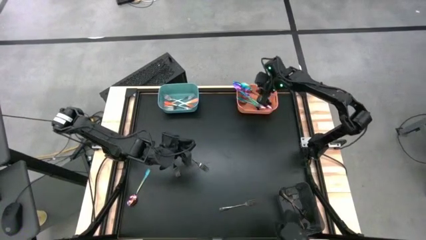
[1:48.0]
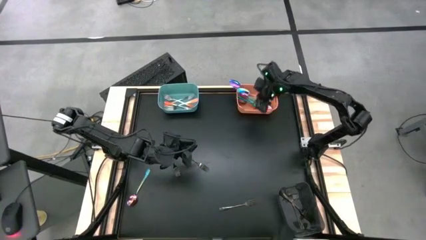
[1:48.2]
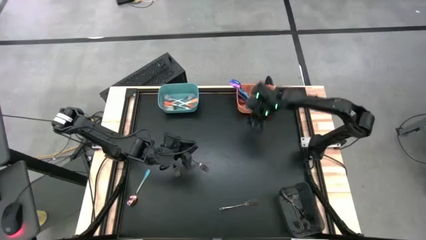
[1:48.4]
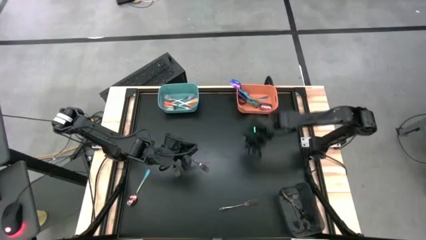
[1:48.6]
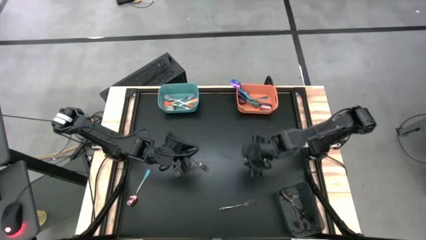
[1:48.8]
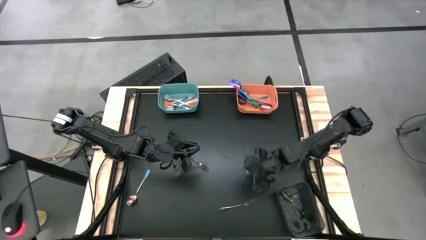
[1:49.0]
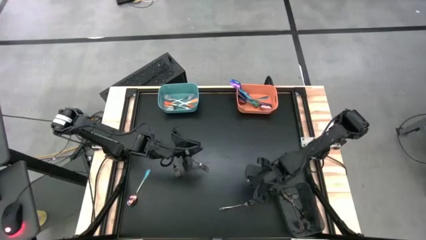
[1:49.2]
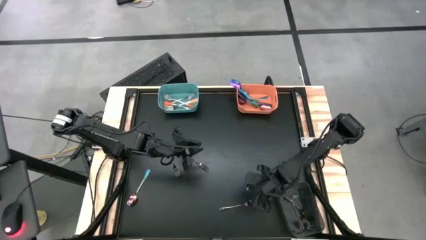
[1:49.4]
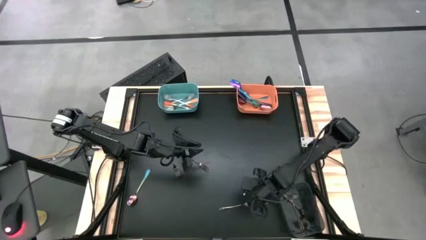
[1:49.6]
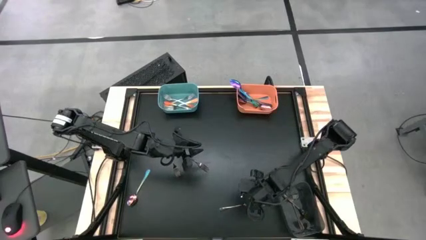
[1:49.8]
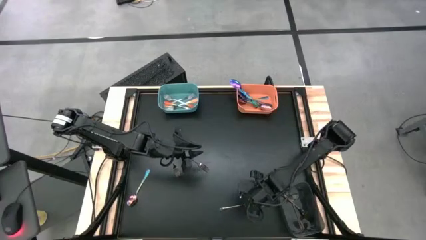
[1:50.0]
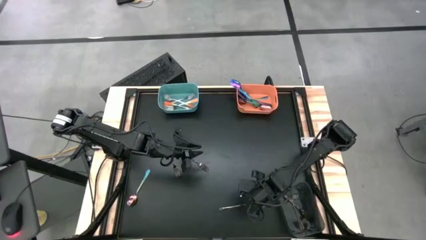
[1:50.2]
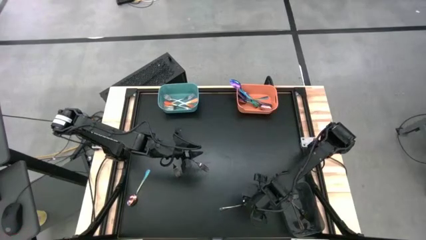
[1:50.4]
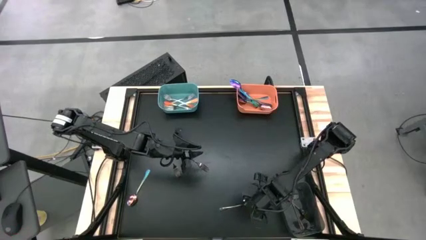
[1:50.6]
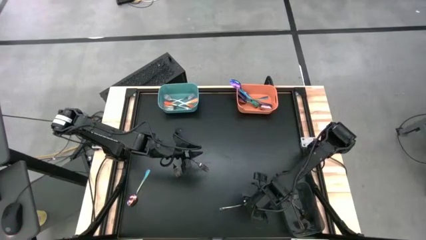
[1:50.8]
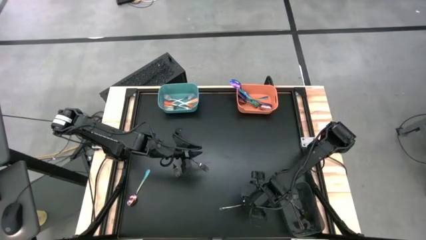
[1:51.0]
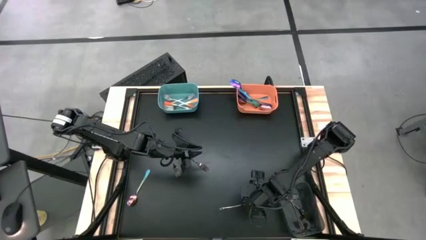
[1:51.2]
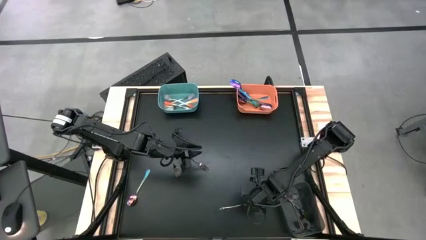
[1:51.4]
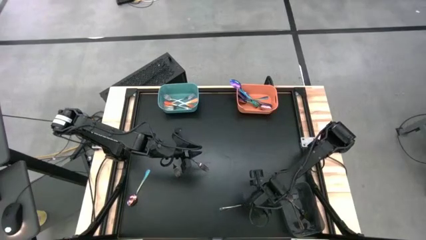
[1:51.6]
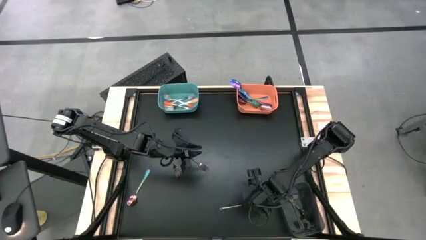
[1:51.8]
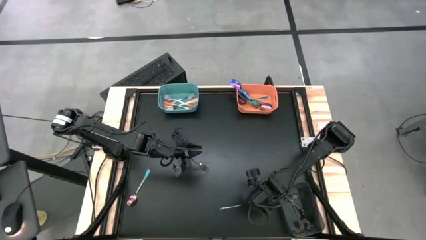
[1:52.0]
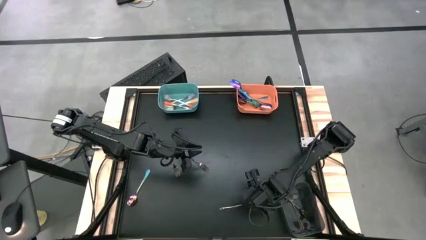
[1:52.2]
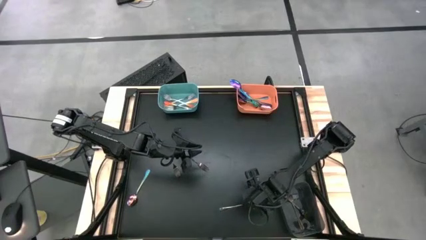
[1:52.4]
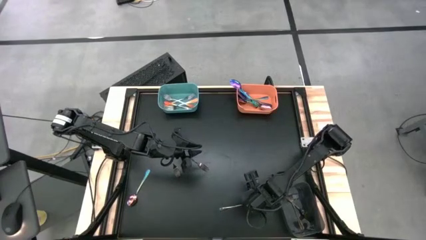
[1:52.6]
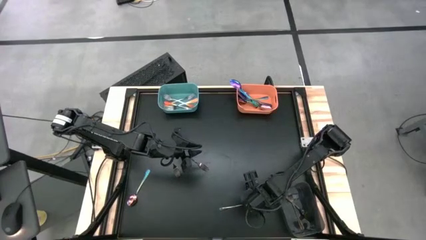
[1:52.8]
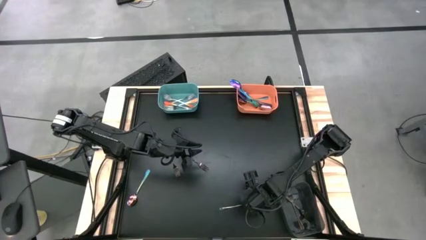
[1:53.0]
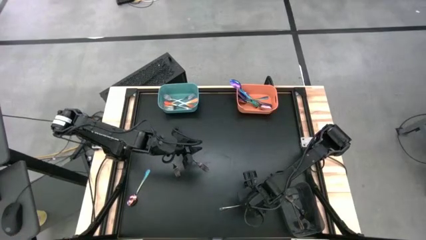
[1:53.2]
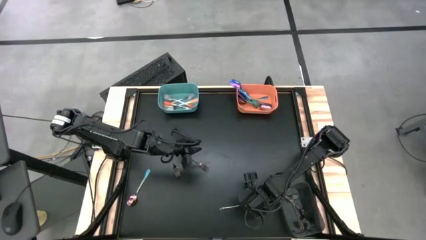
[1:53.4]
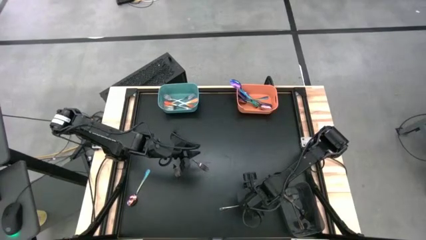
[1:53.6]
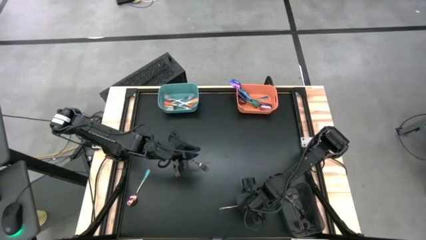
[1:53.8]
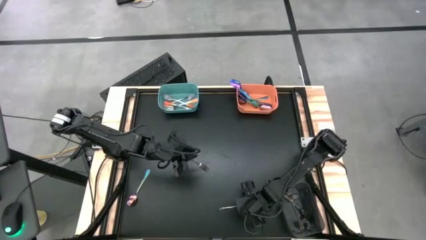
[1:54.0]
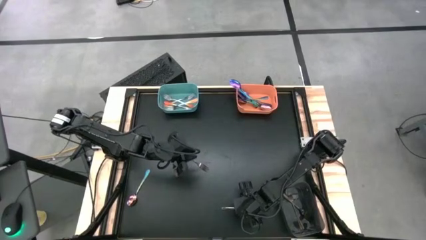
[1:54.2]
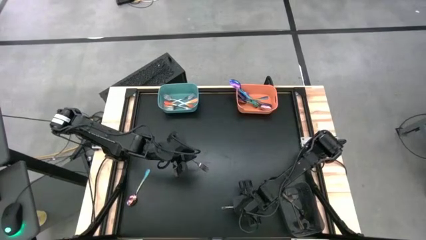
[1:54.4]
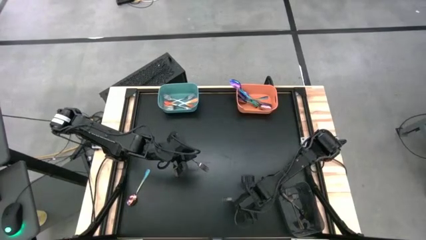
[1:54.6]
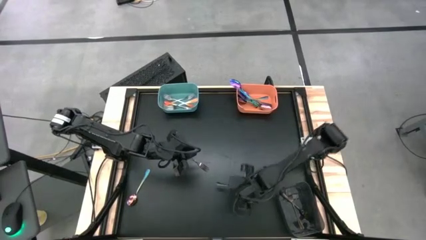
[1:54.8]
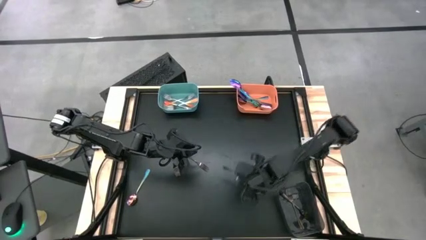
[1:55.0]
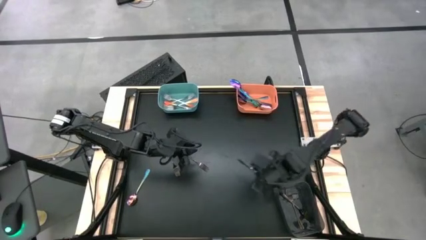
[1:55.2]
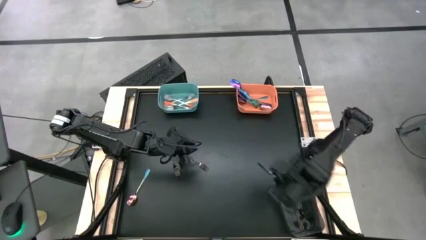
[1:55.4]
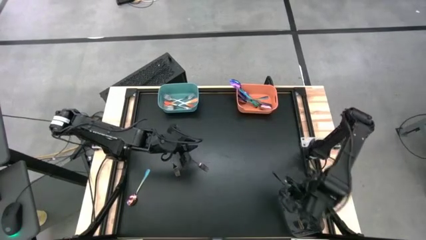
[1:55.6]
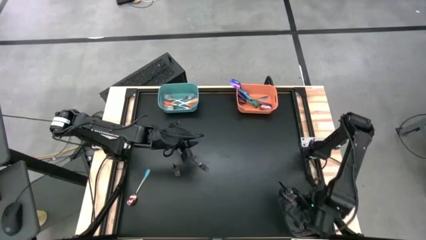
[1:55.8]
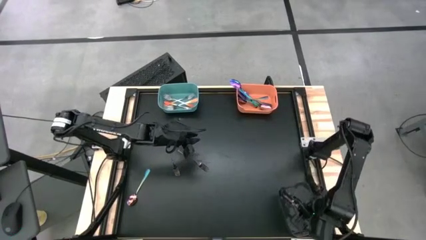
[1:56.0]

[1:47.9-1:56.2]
Task: Sort silverware by color (type)
Put the black fork into the black bin

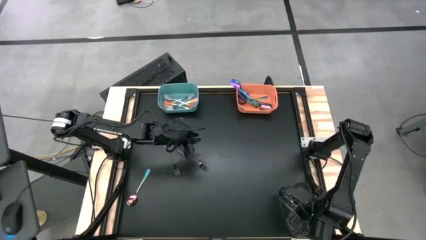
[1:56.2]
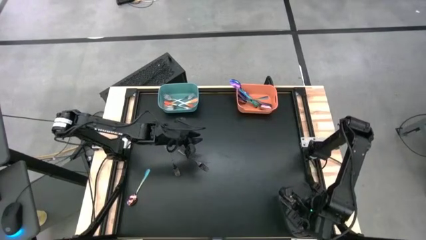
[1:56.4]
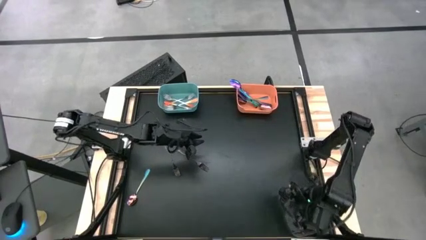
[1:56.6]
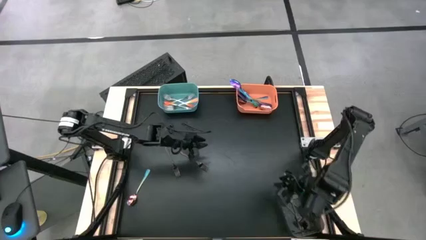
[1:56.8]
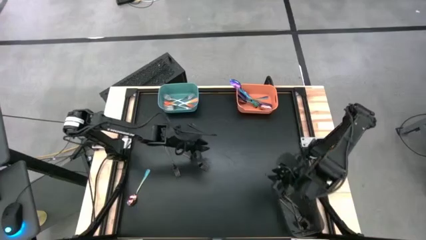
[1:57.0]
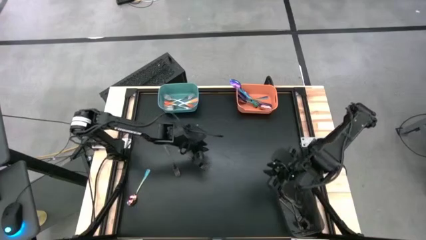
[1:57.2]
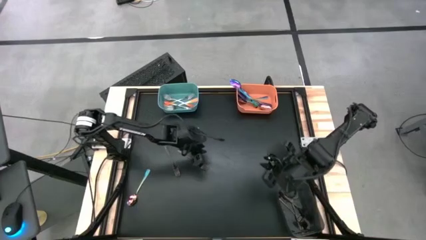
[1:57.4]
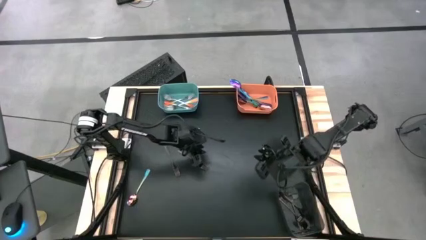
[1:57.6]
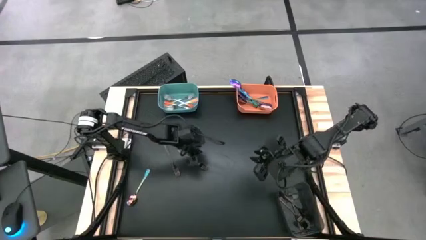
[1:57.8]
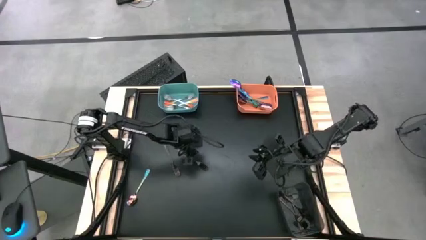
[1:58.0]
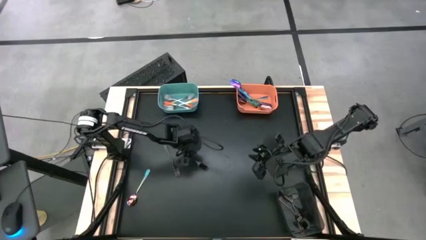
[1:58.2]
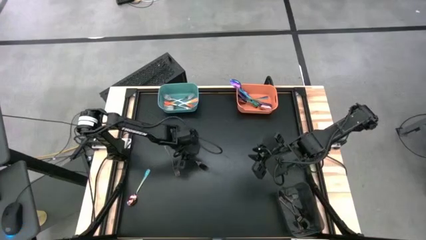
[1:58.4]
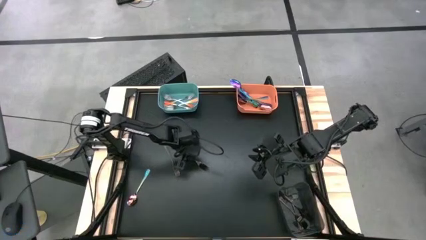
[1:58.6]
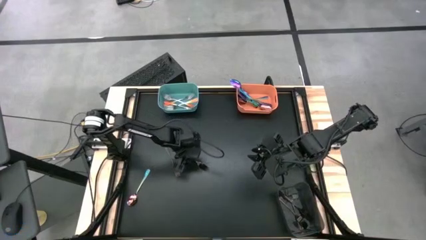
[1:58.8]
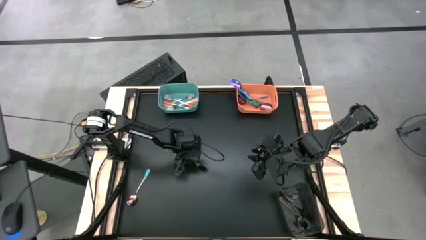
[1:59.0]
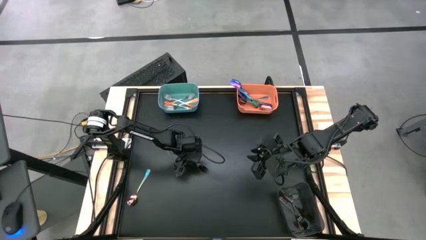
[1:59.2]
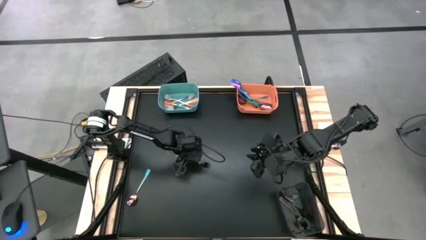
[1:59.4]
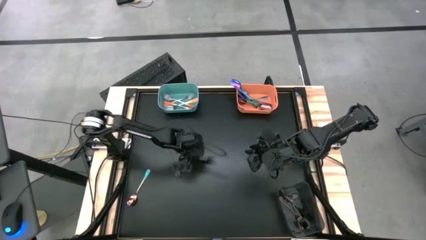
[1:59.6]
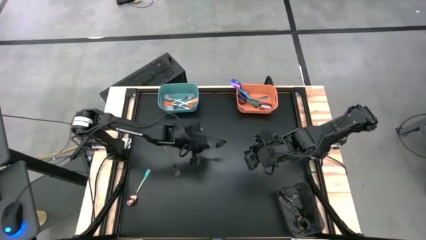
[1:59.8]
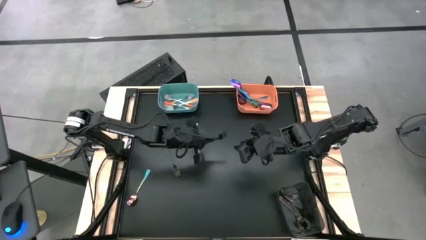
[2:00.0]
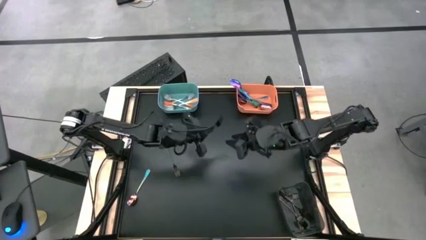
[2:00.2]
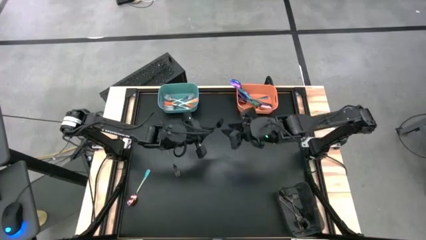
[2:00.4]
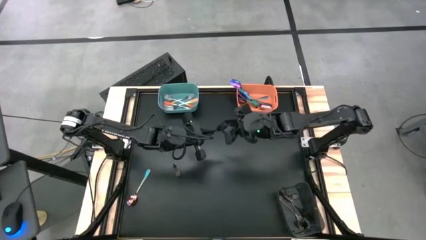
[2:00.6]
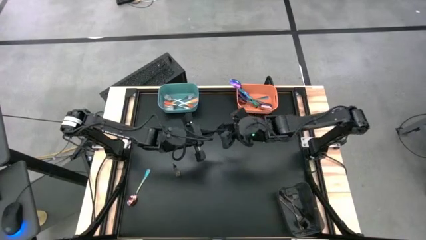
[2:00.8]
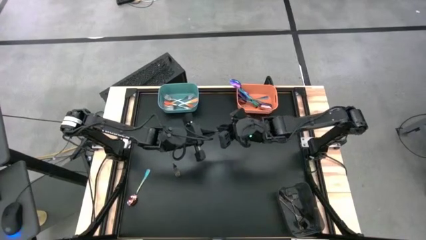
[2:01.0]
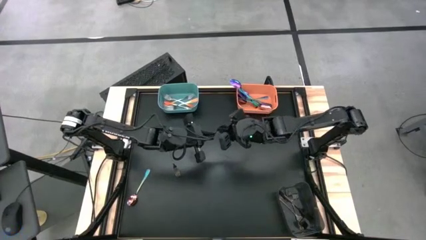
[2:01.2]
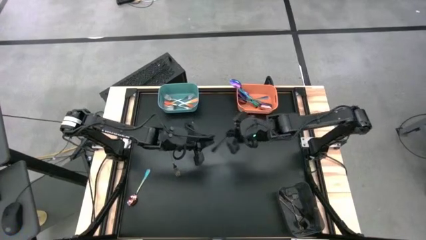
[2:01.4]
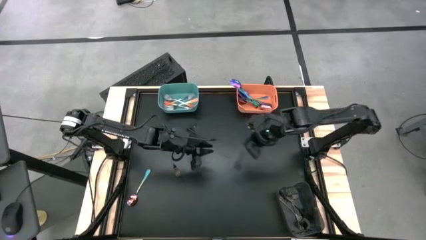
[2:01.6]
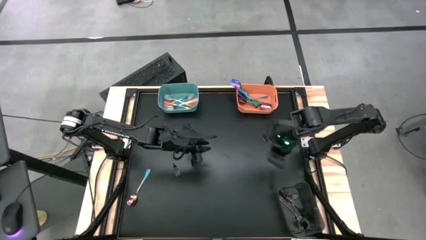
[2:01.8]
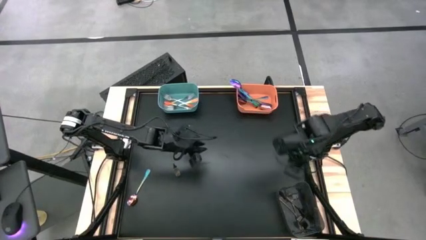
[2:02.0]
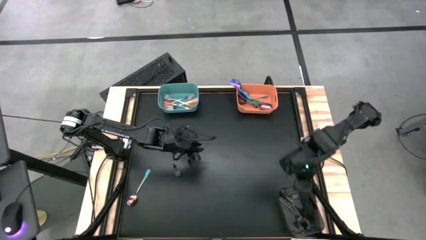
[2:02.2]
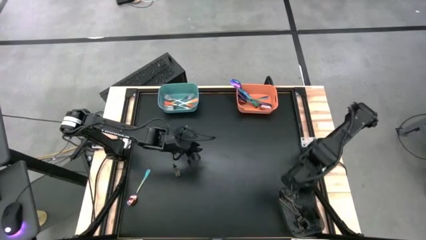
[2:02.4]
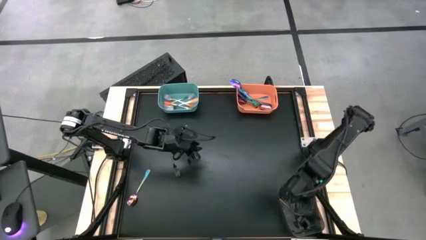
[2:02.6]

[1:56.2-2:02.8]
Put the black fork into the black bin

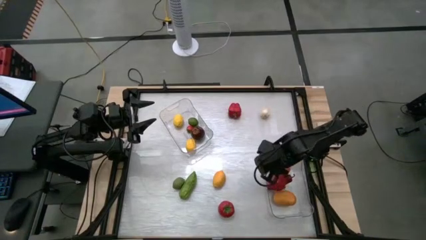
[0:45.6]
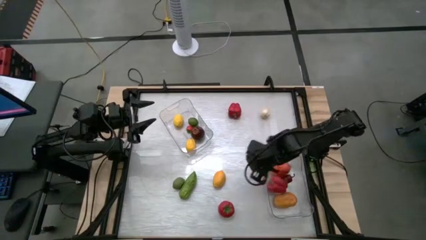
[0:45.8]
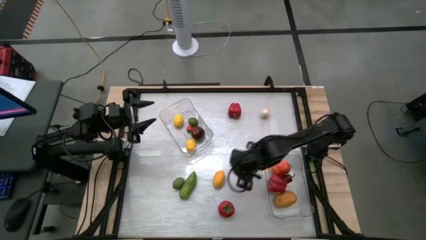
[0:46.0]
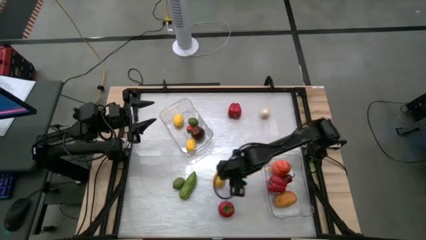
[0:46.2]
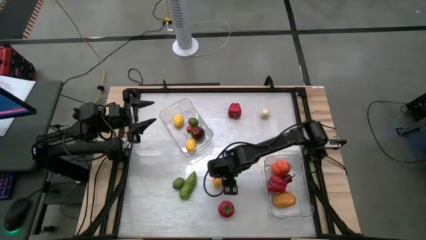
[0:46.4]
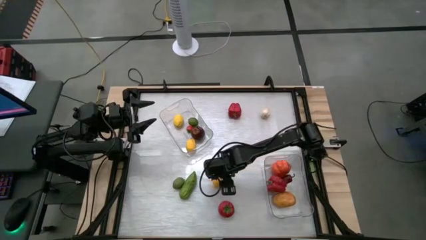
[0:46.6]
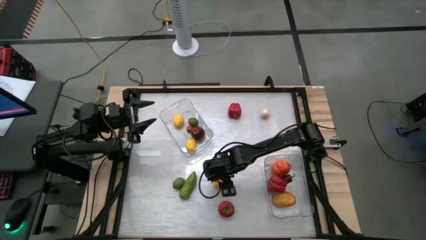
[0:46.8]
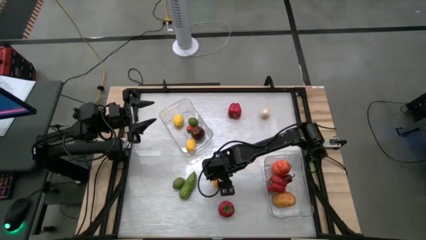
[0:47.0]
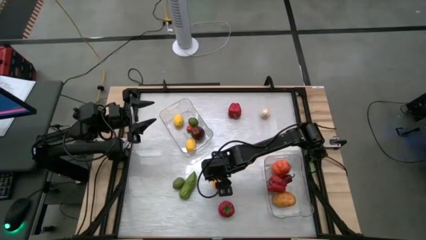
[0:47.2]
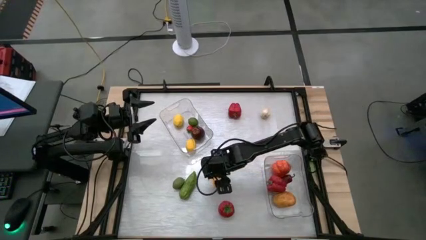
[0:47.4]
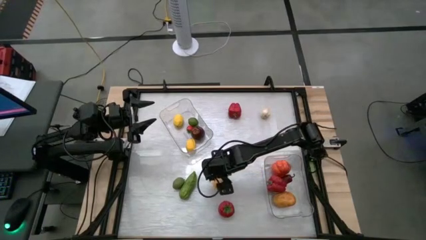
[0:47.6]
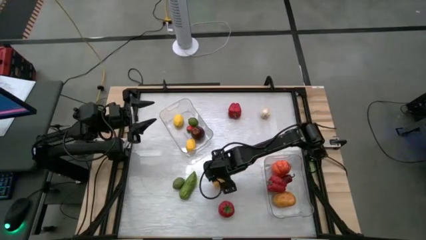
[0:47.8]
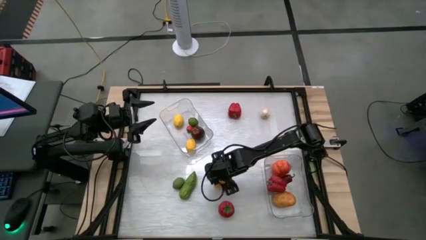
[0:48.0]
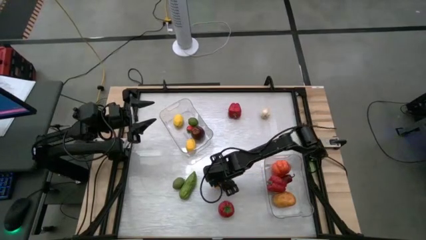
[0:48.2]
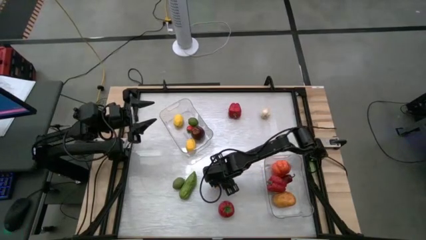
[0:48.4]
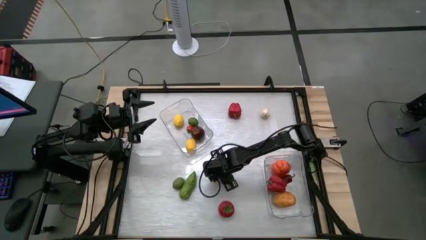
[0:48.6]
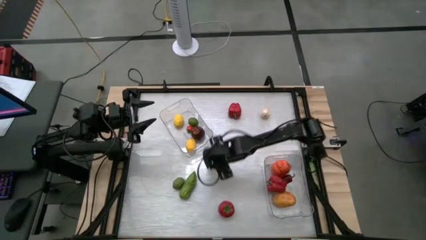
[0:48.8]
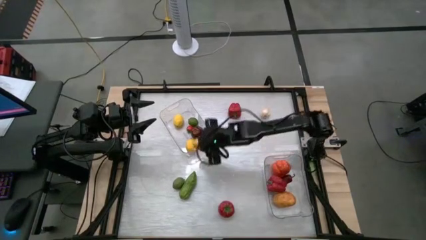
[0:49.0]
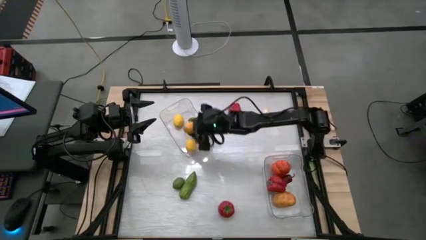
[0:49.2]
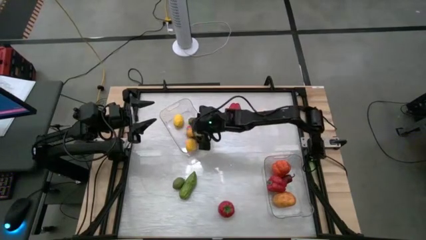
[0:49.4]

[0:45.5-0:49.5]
Task: Sort produce into baskets
Put the yellow lemon into the top transparent bin
